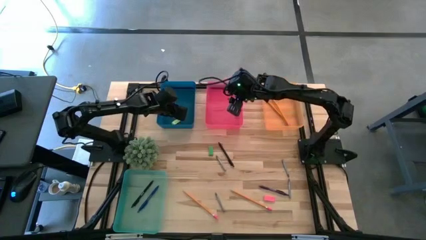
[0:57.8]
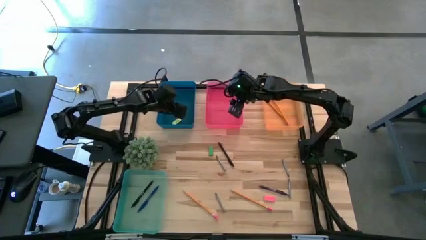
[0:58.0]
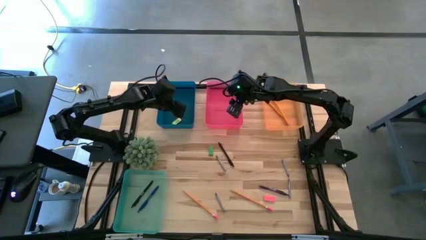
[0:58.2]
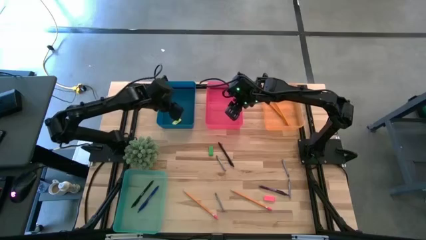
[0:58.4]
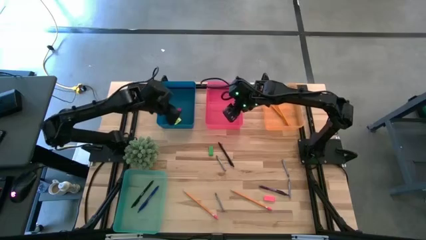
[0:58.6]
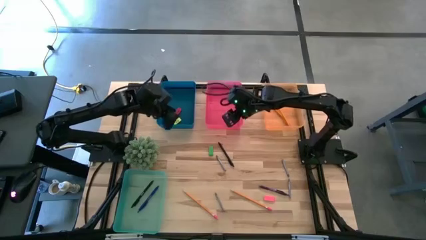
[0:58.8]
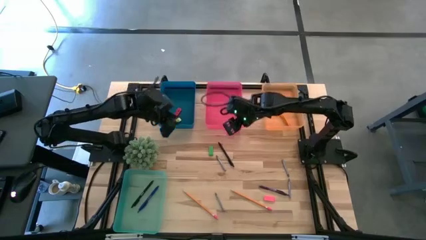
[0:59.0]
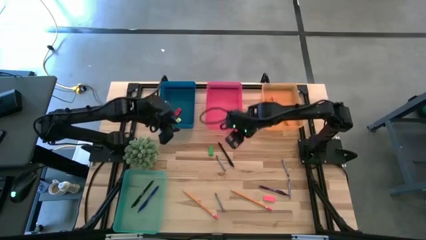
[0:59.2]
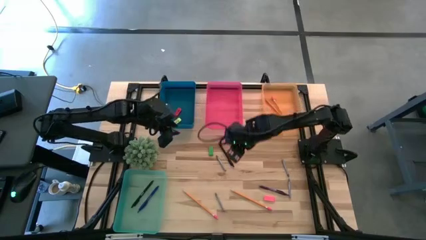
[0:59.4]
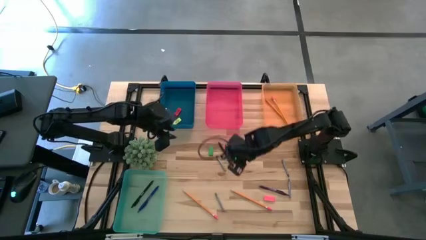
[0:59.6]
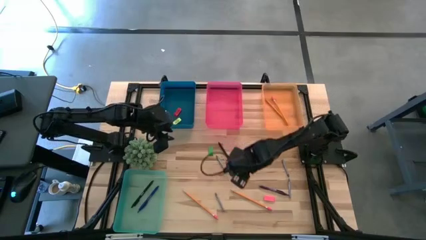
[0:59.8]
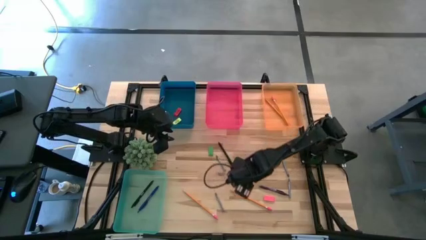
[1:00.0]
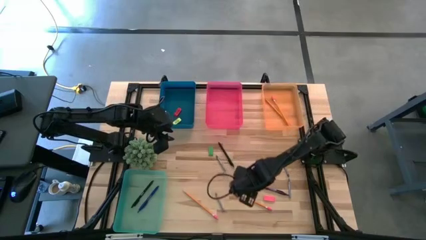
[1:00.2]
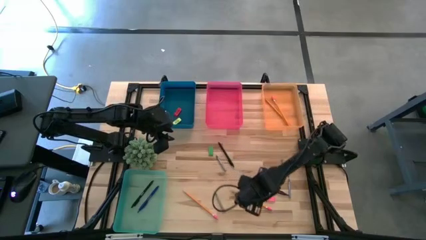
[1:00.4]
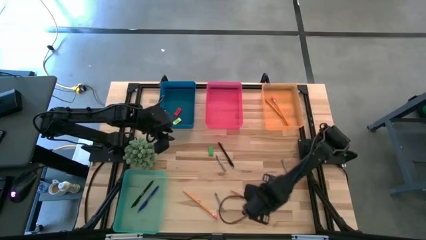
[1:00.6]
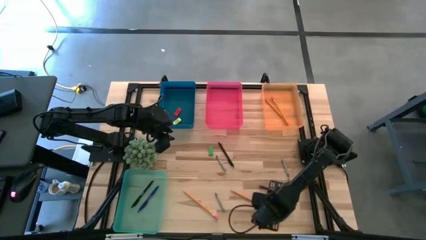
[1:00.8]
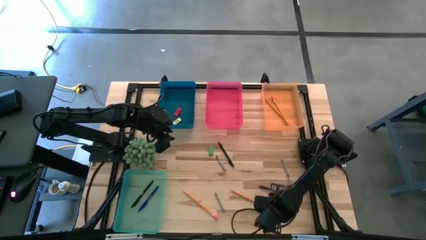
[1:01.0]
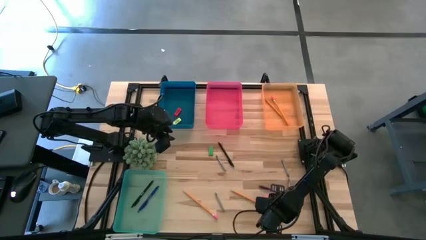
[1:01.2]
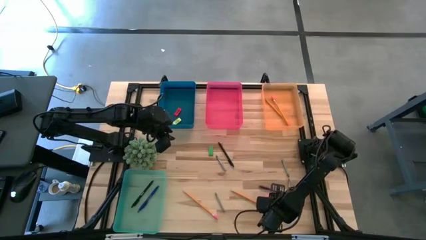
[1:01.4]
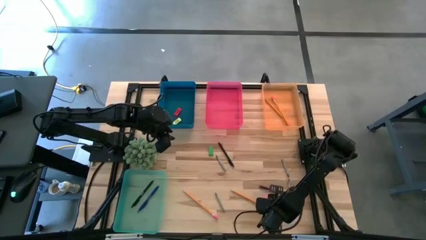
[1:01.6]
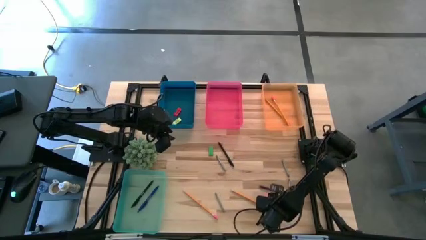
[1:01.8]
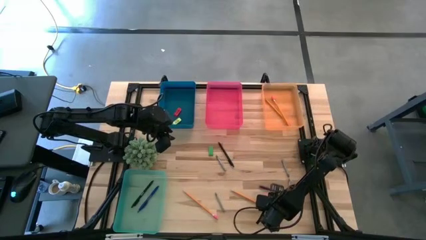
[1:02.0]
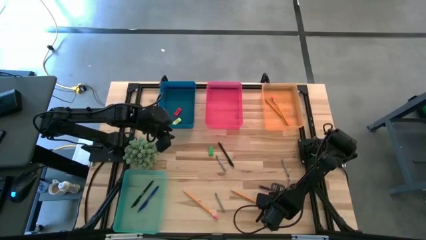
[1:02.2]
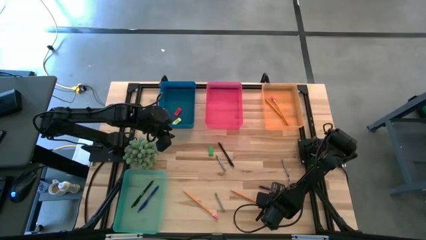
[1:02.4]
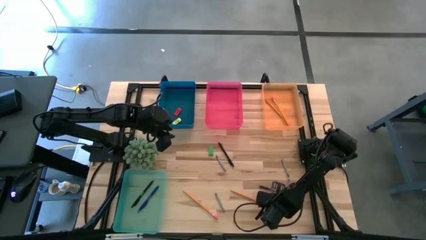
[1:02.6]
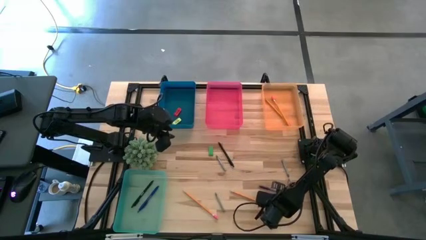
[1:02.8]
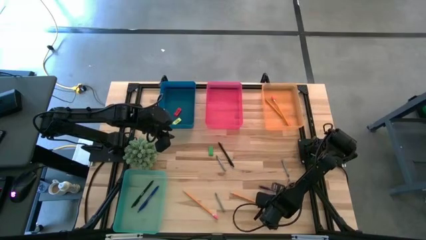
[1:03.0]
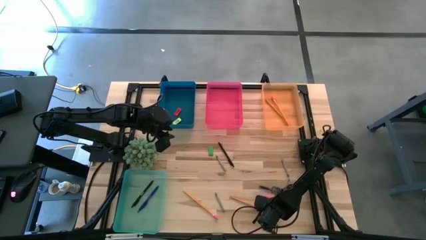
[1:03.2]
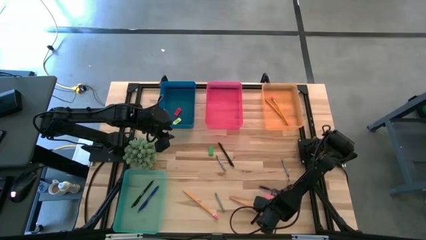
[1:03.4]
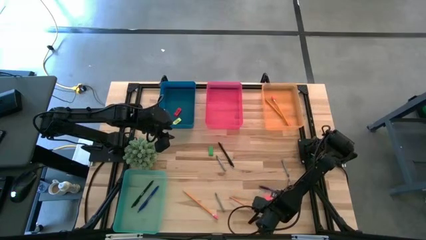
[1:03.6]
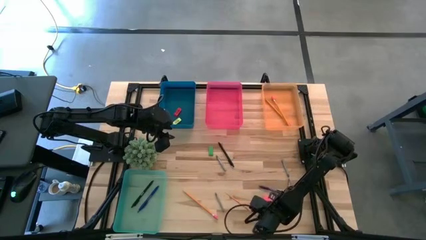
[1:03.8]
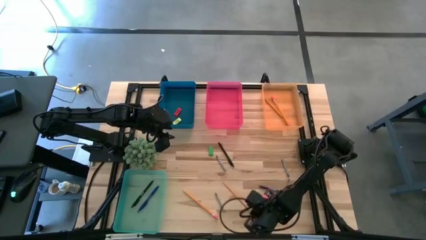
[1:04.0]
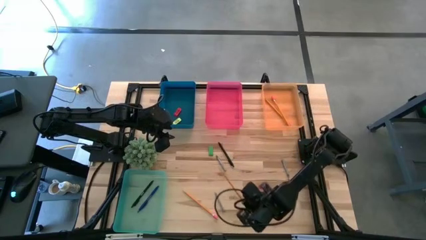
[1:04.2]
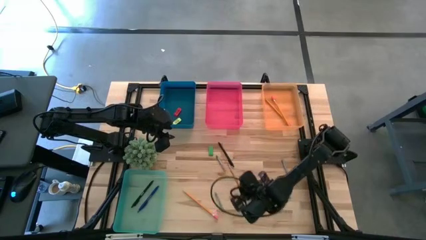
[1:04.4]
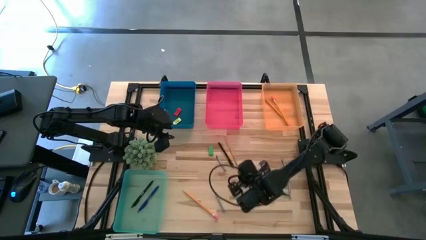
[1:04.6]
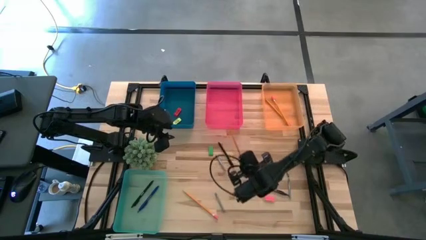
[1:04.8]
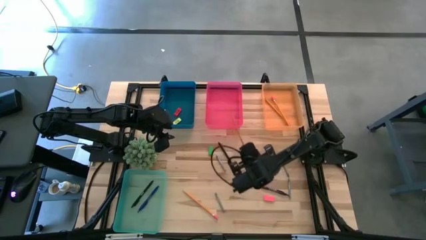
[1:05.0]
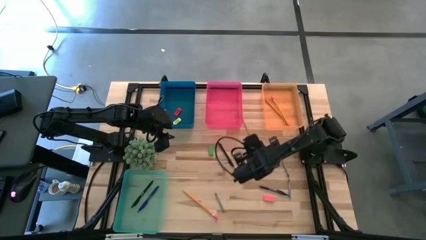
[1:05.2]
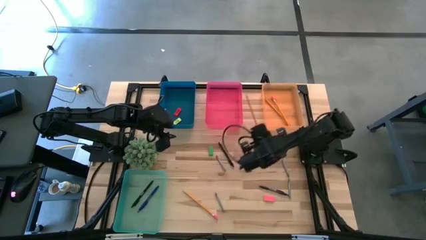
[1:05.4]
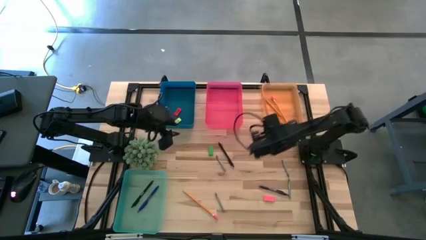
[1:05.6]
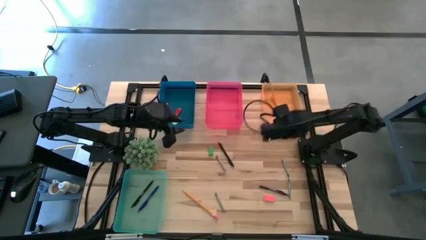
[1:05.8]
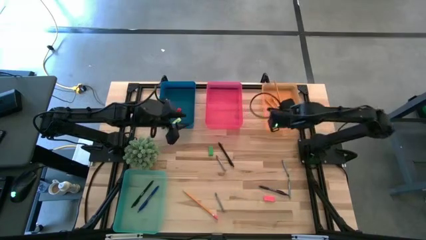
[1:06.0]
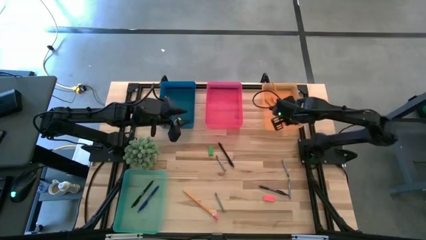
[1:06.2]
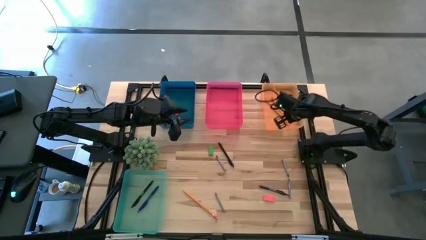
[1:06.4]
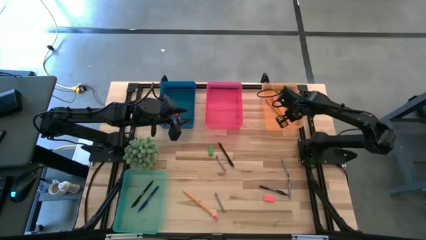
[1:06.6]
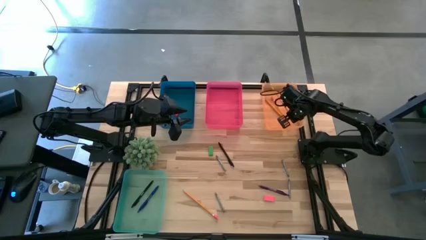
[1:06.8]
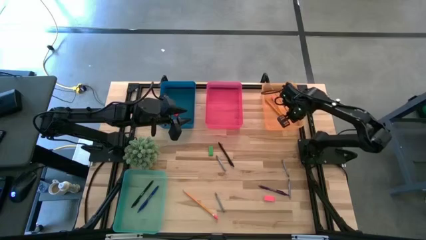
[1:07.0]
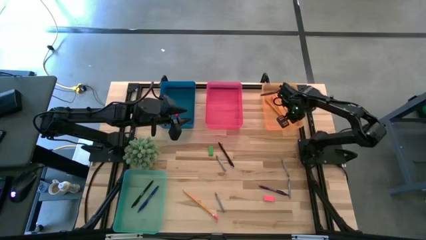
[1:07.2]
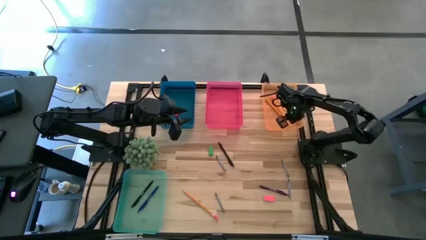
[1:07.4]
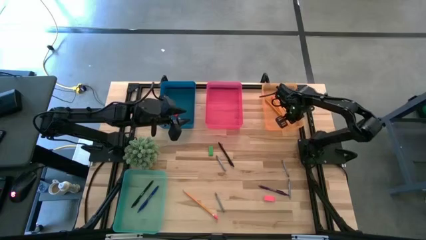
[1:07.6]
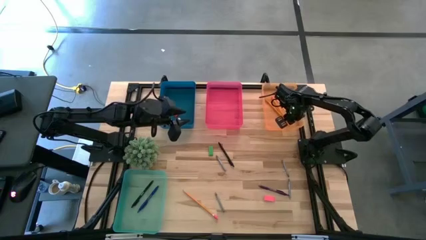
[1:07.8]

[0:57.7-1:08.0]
Task: Sort crayons/erasers/pens/pencils in bins
Put the right pencil into the transparent orange bin

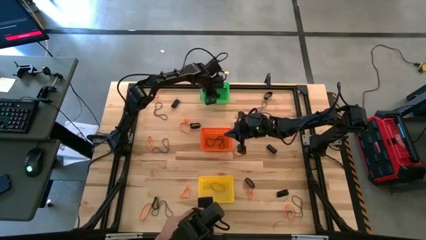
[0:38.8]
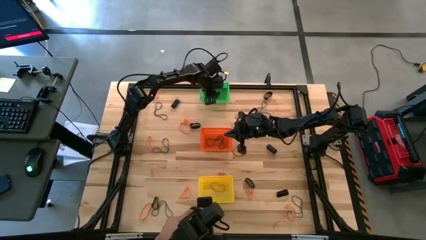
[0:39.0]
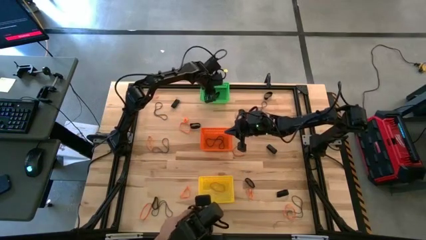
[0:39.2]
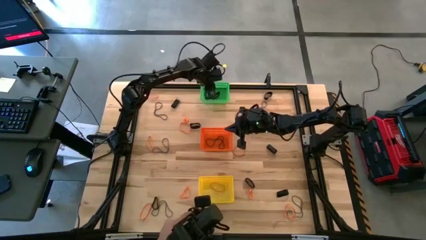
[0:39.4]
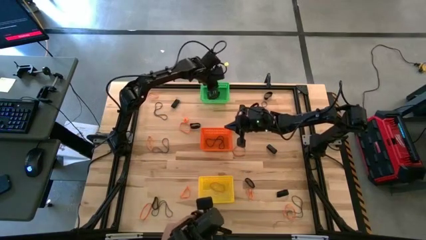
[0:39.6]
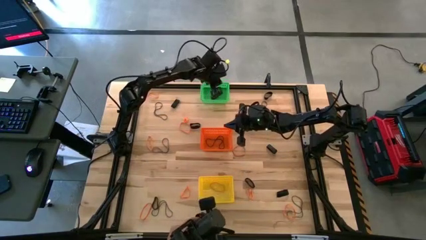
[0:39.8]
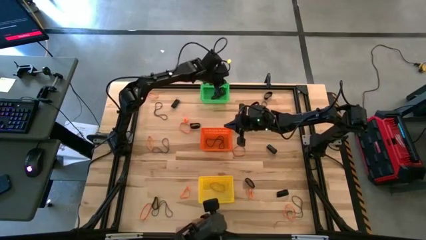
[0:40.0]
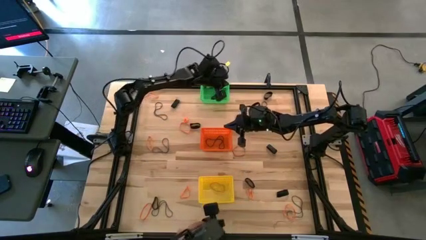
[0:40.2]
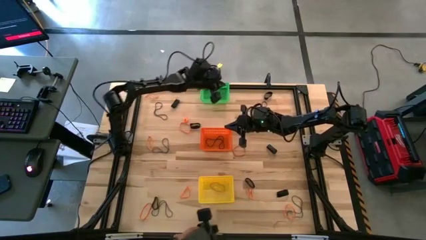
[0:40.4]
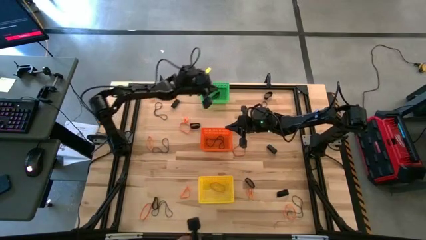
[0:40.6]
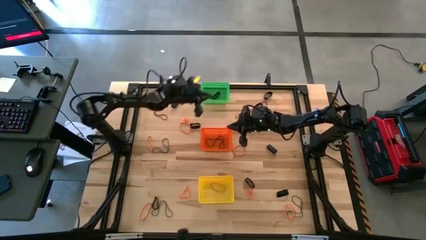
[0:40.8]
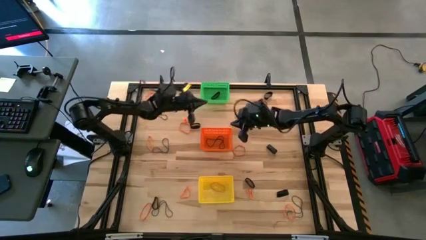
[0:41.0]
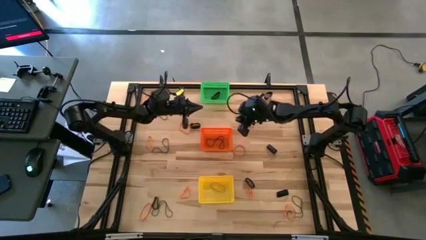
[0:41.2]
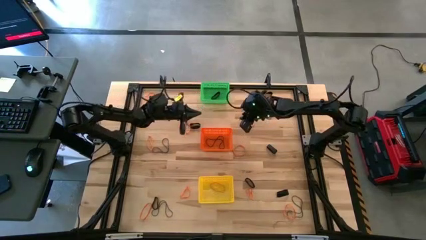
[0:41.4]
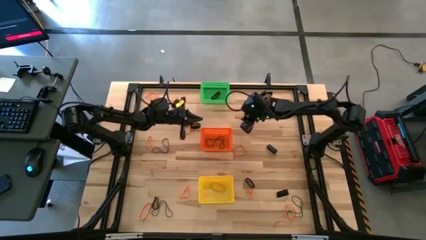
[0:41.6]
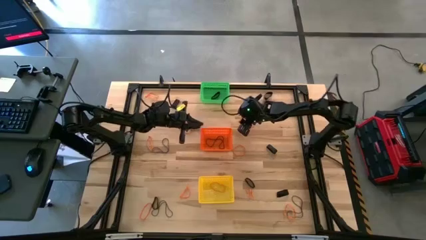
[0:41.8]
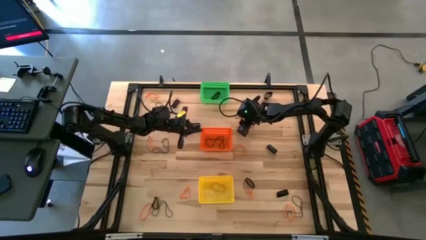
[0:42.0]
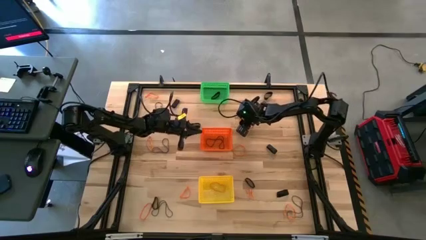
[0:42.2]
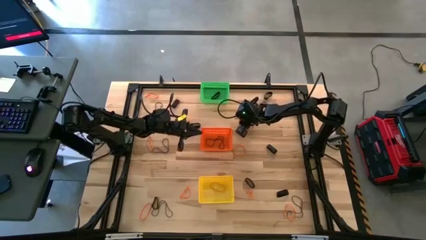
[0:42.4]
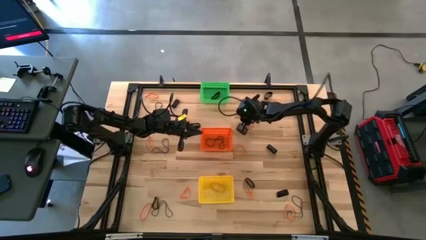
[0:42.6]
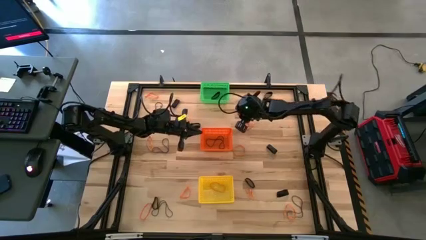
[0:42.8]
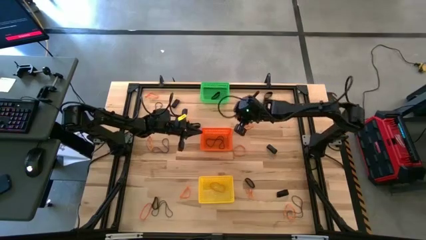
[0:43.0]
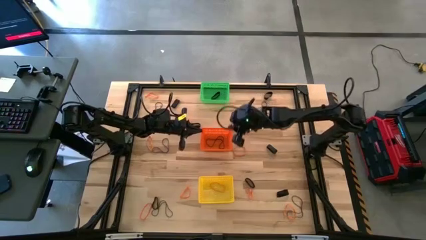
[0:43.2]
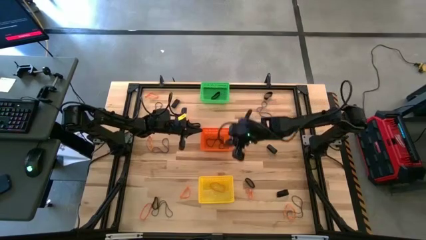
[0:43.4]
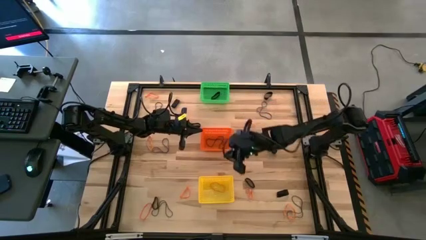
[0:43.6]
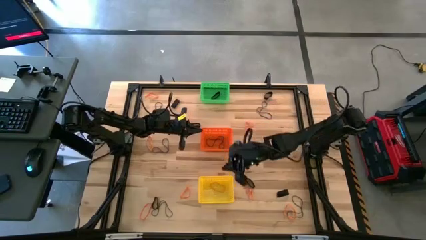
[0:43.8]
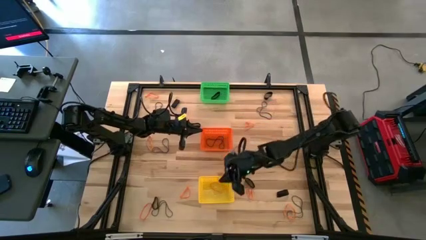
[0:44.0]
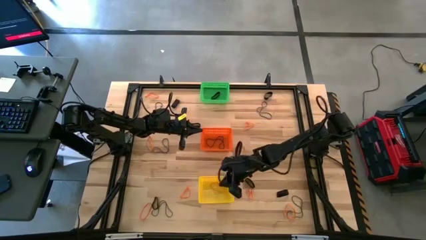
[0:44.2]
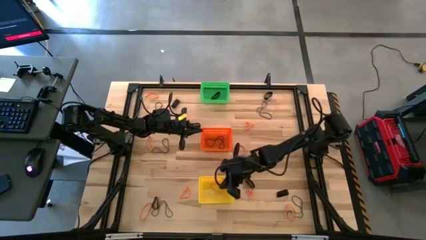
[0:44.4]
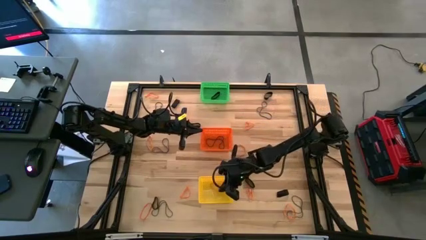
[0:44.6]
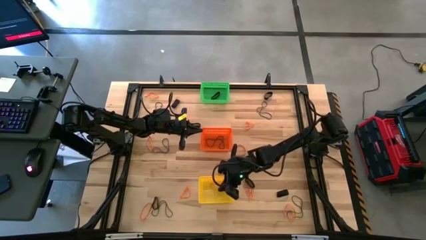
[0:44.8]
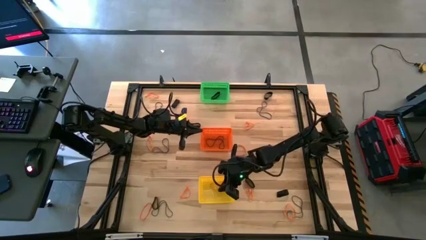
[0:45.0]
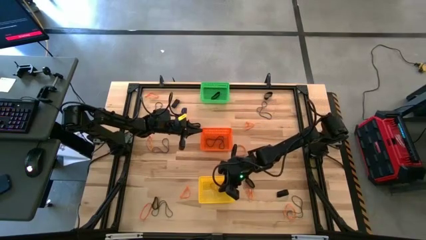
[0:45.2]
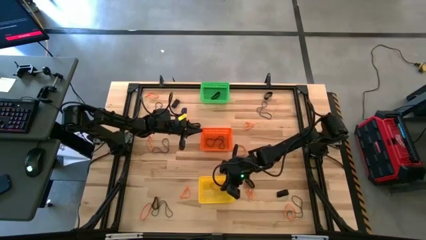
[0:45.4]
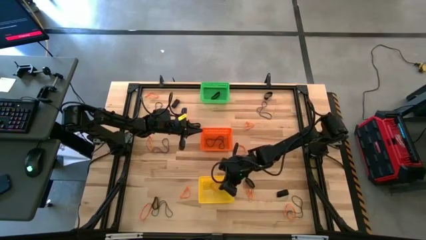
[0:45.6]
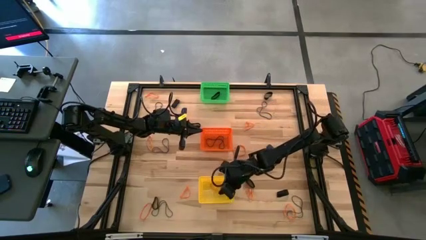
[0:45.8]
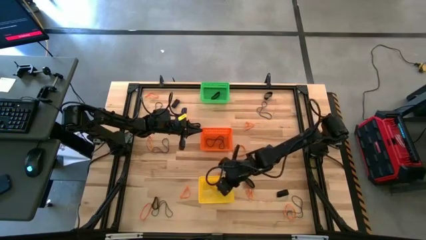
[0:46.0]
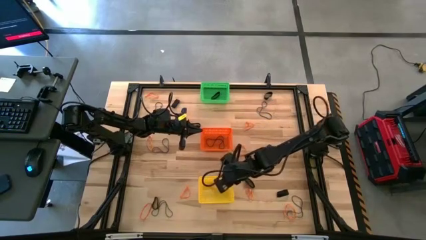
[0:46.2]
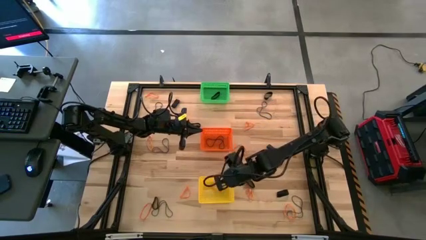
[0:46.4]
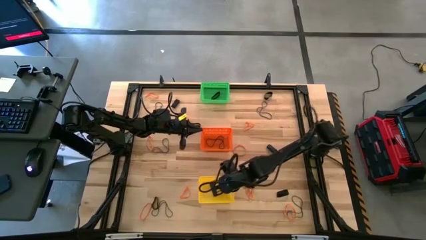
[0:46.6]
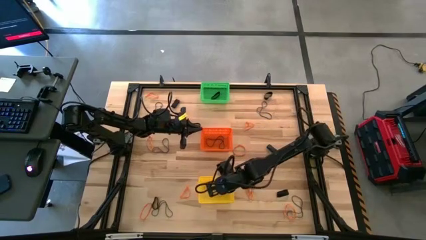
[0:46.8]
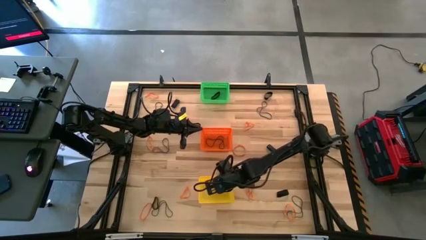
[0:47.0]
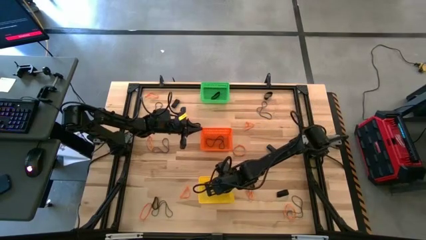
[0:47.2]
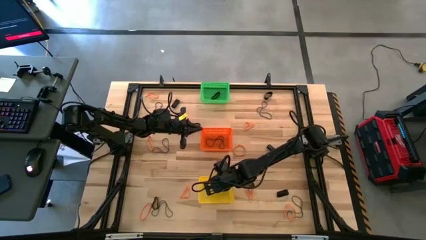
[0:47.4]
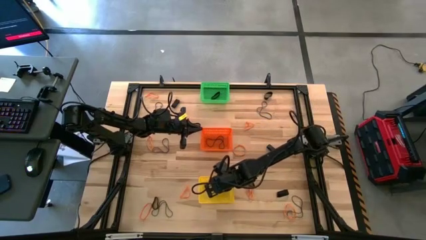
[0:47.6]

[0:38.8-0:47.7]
Task: Sort rubber bands into baskets
Put the orange rubber band into the yellow bin
